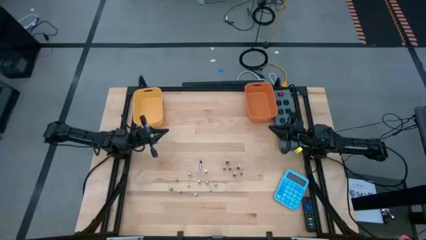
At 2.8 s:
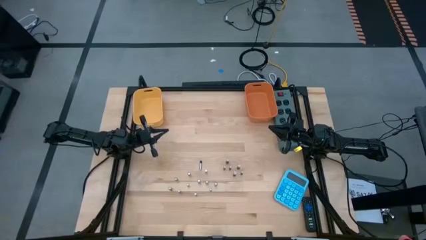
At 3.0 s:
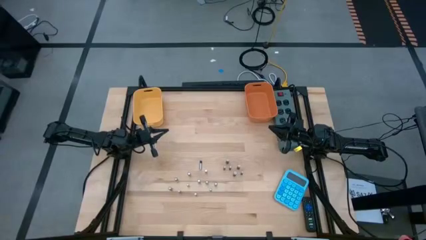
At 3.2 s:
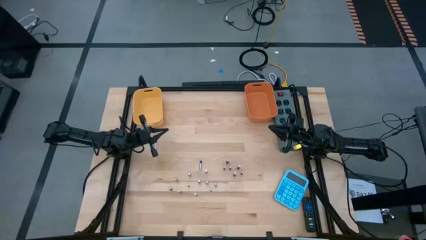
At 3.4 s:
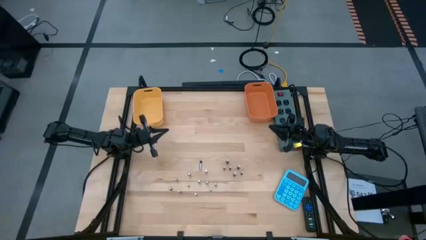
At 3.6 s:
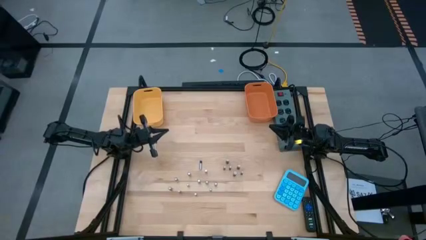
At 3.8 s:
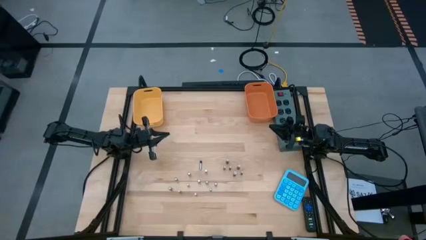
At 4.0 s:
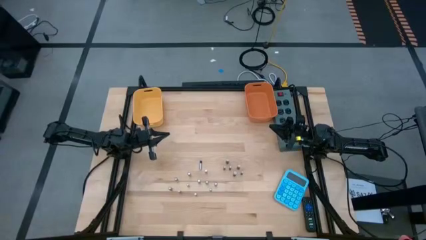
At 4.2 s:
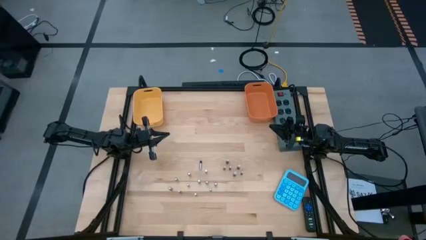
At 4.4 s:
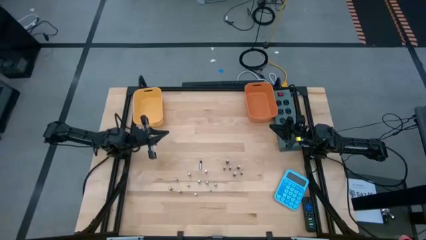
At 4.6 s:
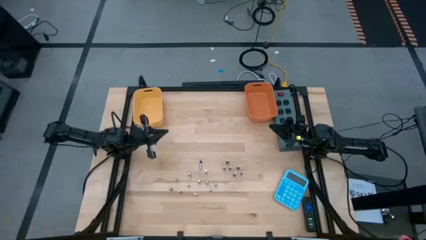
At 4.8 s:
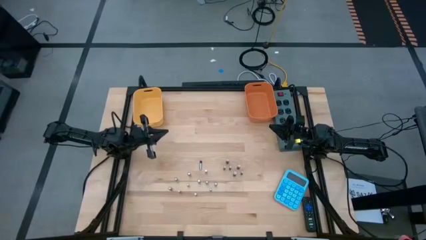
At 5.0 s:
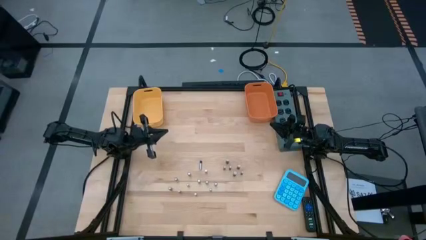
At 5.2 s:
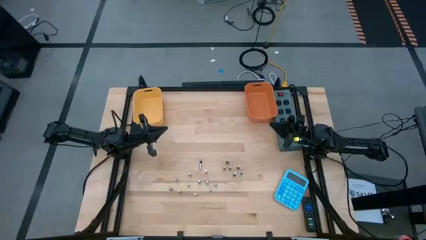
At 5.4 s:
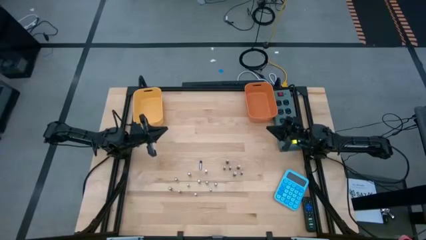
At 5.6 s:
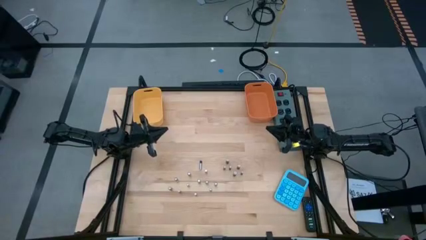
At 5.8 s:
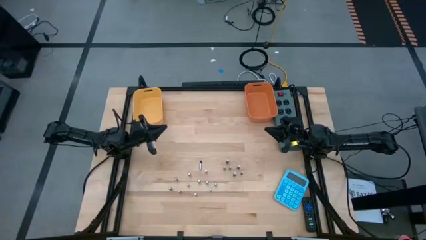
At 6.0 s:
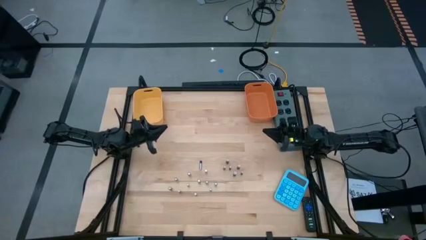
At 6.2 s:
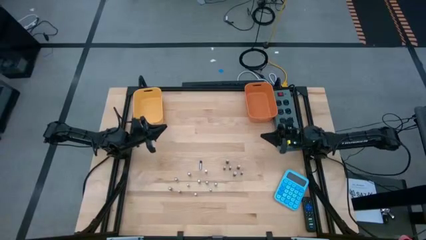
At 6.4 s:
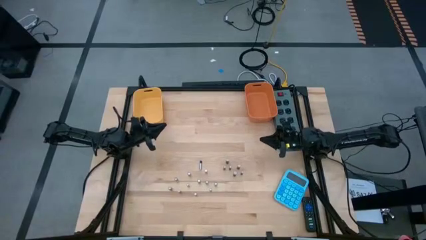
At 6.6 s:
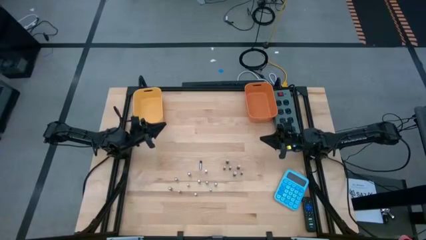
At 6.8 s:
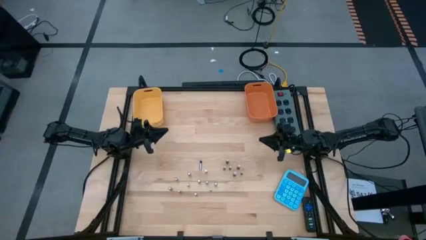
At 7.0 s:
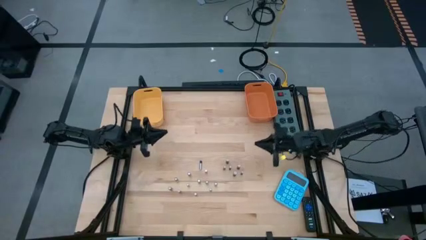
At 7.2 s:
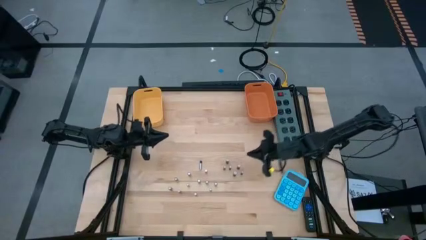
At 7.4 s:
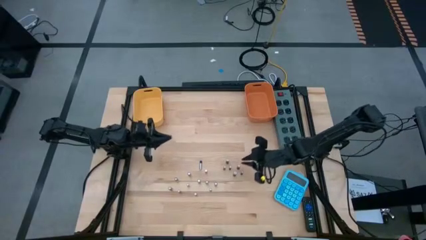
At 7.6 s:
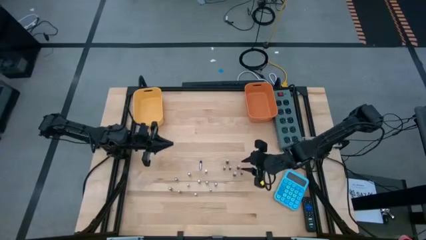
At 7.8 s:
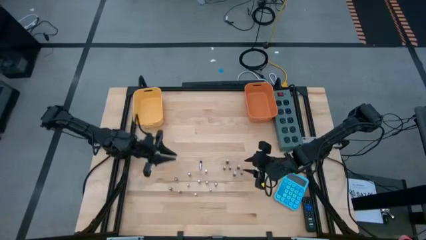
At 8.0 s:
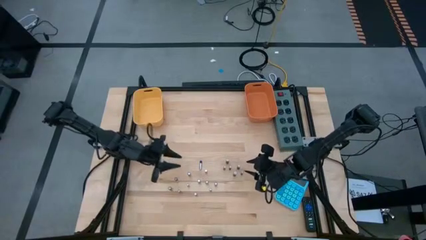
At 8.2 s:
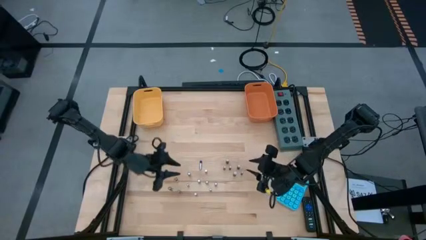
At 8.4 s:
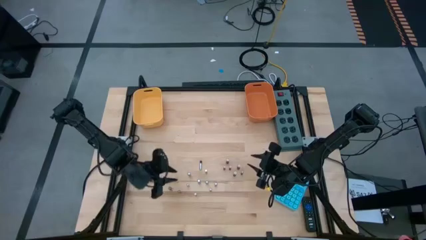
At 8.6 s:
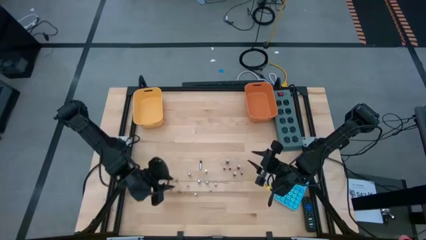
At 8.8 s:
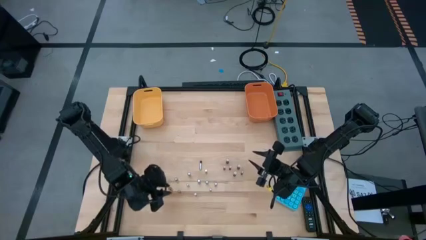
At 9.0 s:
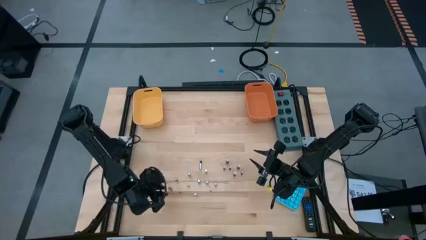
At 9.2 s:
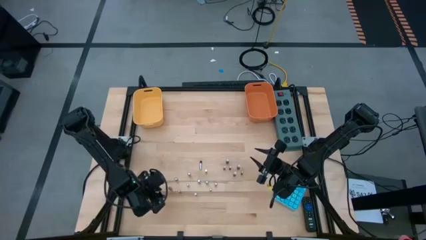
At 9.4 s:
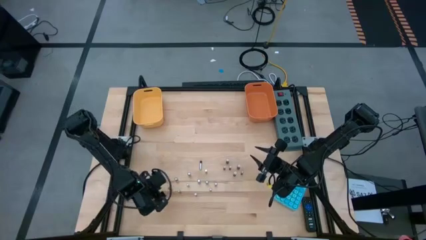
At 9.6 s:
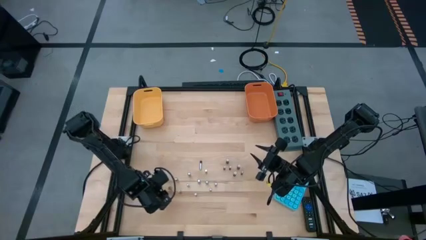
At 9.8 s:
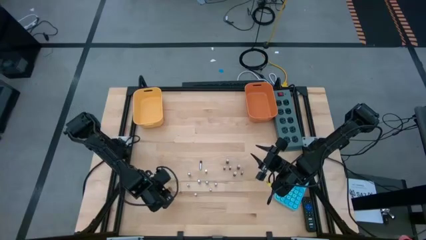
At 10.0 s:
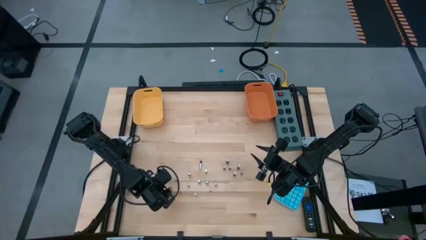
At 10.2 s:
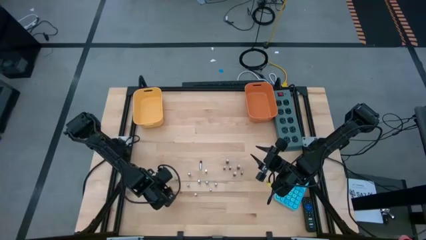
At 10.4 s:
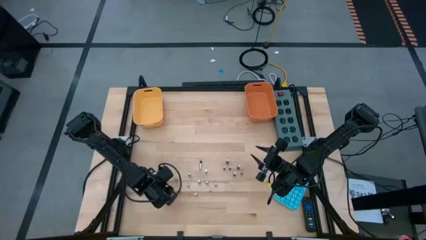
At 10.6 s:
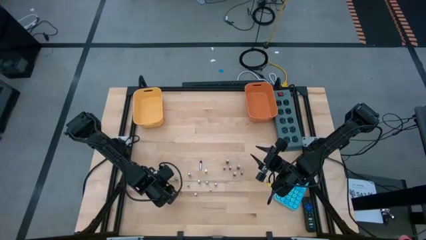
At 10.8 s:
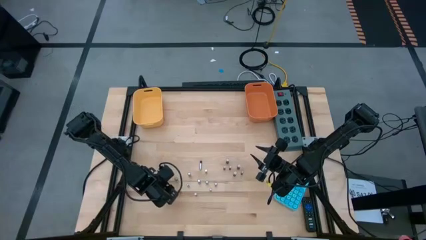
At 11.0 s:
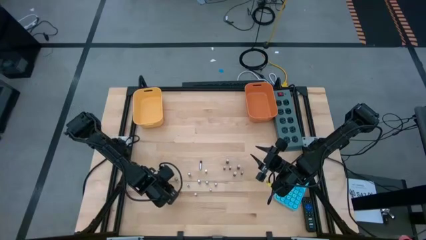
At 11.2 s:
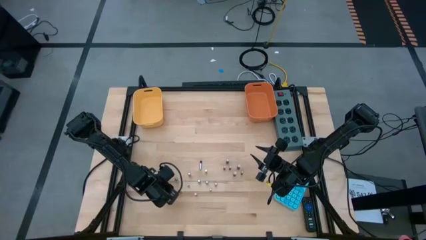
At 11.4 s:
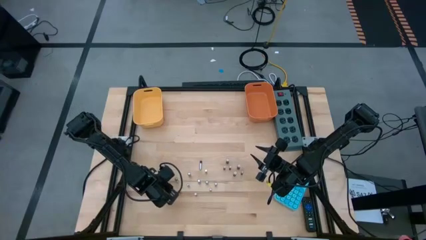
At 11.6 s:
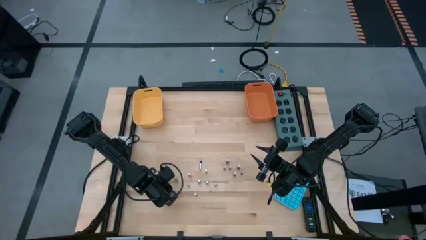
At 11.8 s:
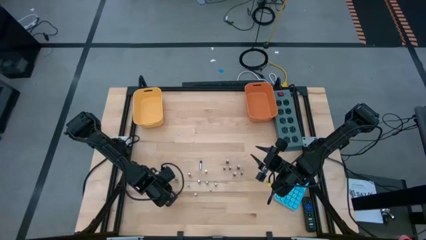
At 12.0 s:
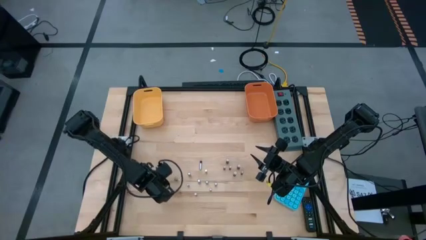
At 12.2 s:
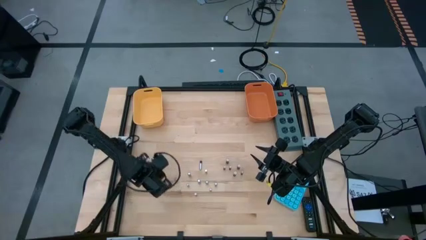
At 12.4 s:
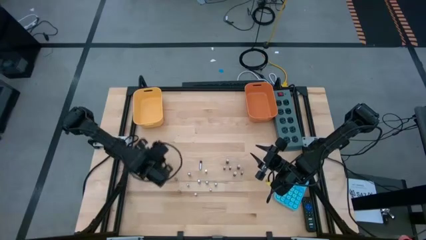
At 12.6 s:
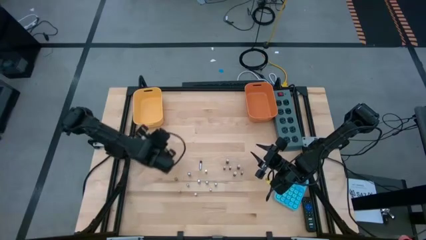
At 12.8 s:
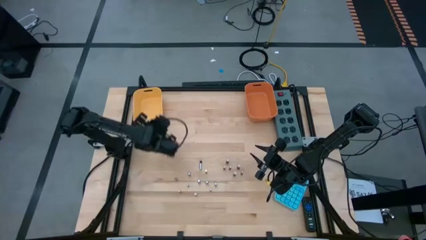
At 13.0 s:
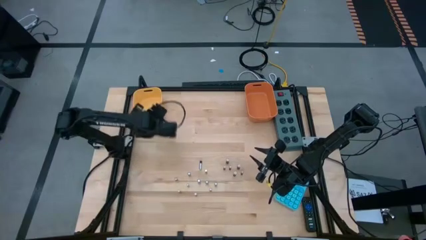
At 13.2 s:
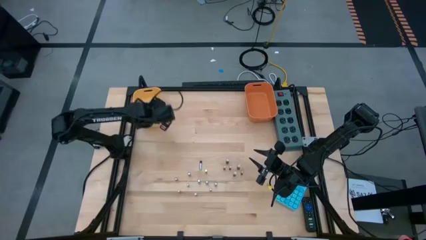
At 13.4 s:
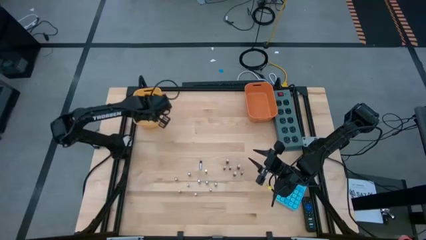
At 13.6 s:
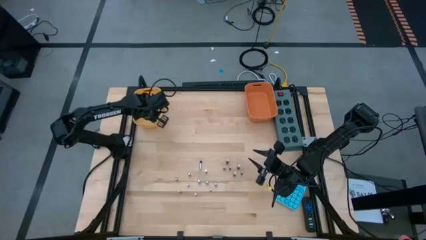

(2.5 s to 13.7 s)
Task: Sort batteries
Put the silver battery into the yellow bin

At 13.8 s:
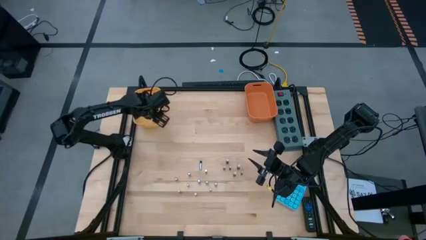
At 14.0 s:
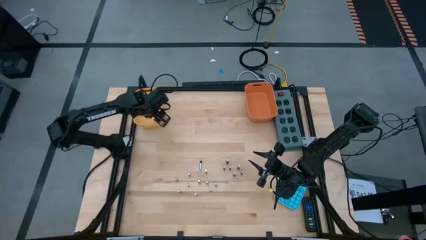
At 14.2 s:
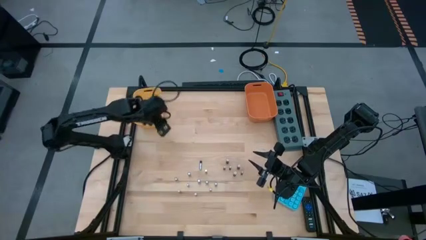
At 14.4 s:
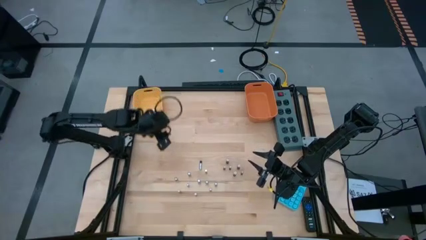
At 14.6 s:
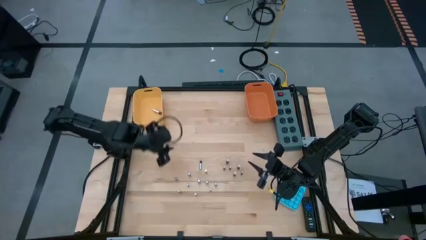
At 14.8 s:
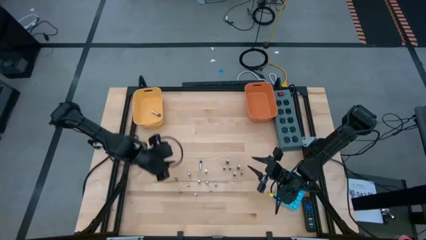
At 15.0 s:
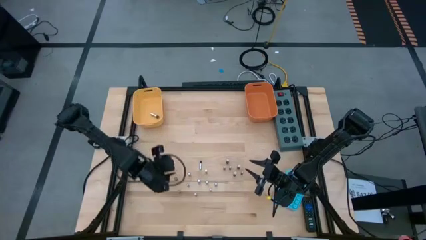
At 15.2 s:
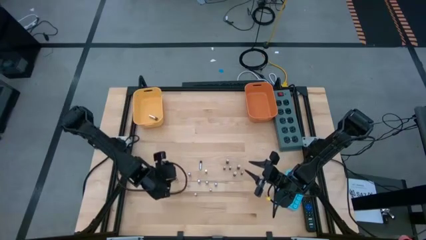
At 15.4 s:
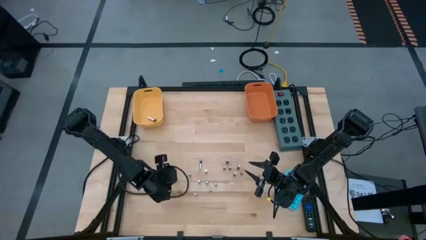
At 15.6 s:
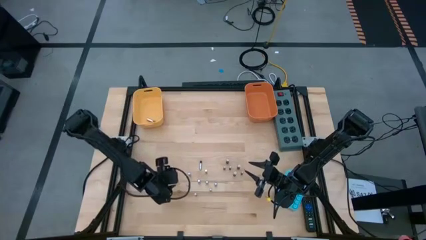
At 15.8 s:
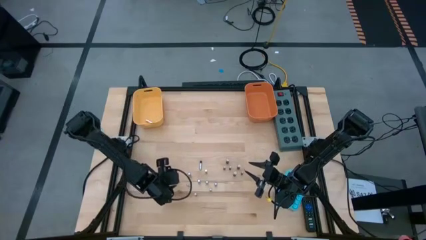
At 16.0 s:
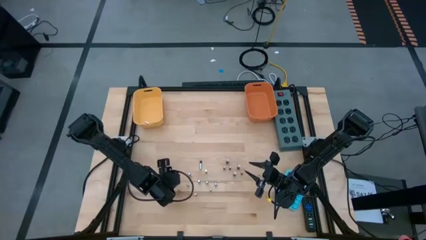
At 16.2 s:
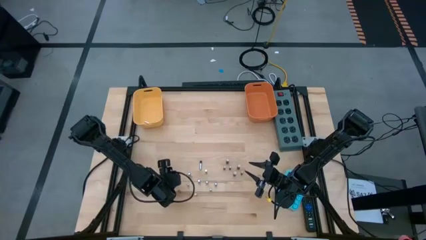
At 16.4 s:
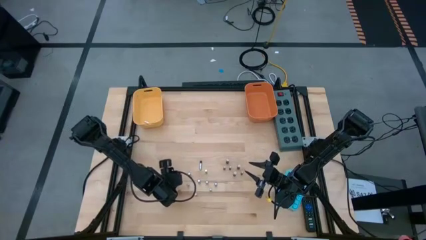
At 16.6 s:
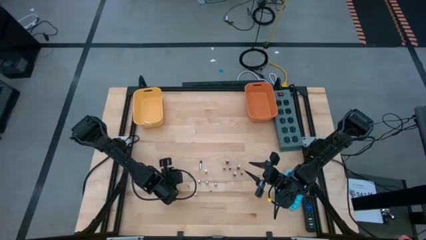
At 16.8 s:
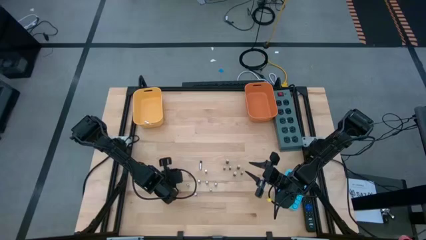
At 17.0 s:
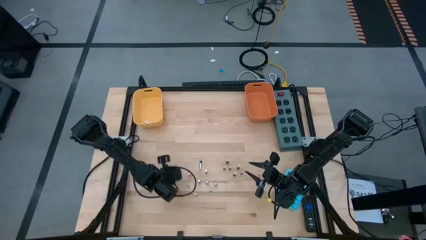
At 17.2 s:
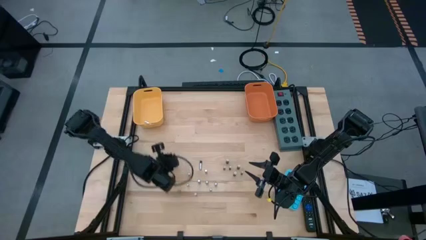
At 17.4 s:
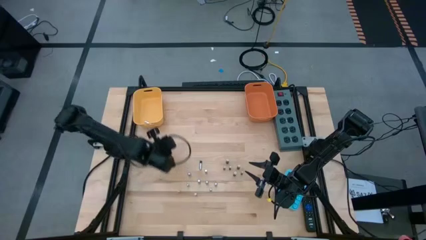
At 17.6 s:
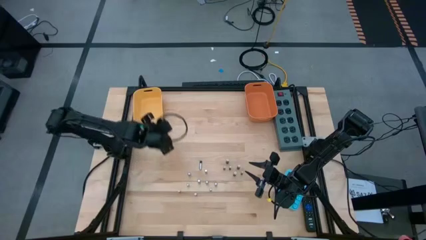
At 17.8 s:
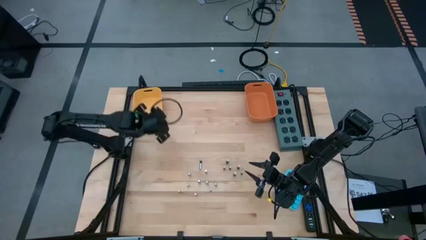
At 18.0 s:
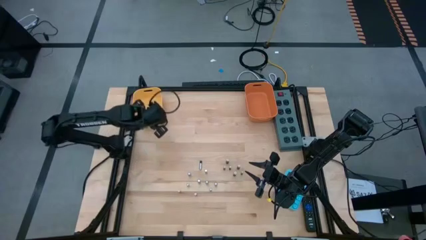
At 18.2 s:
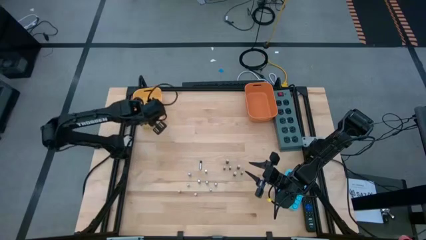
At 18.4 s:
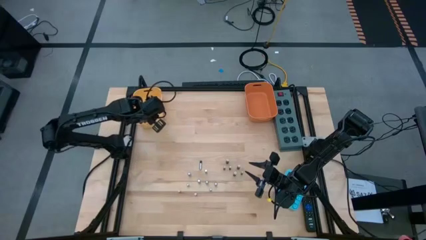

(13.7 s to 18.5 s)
Put the silver battery into the yellow bin
